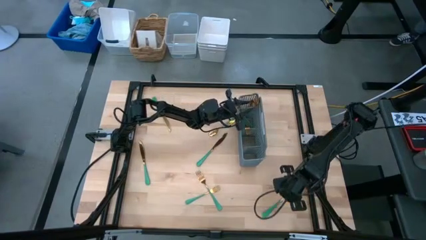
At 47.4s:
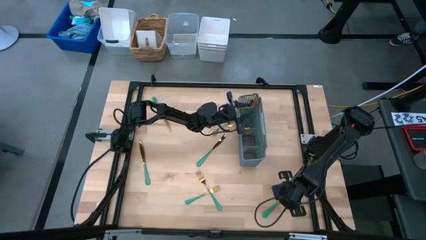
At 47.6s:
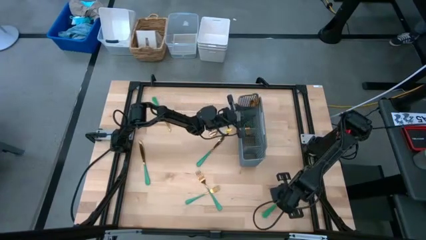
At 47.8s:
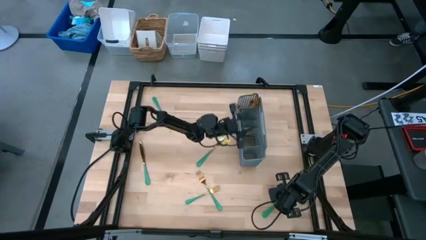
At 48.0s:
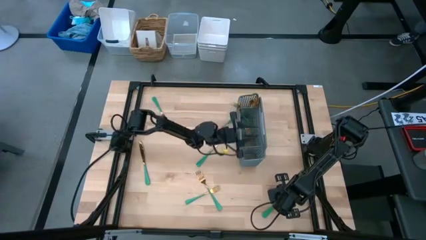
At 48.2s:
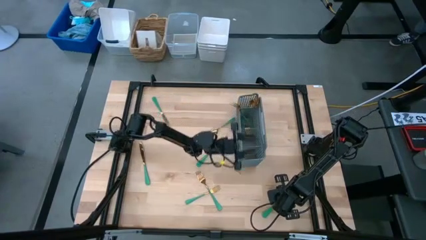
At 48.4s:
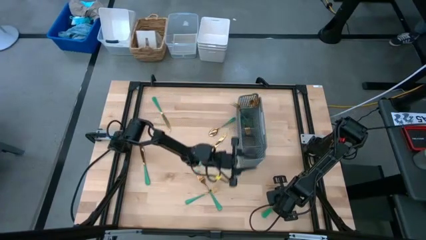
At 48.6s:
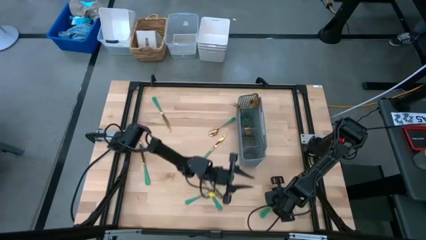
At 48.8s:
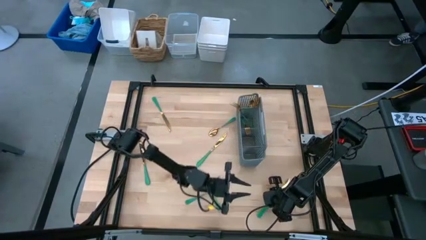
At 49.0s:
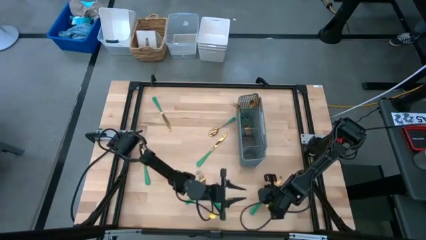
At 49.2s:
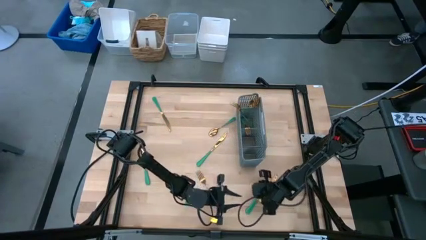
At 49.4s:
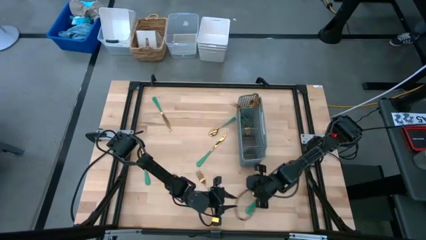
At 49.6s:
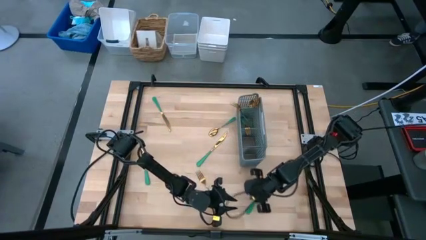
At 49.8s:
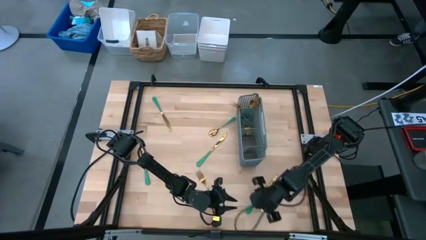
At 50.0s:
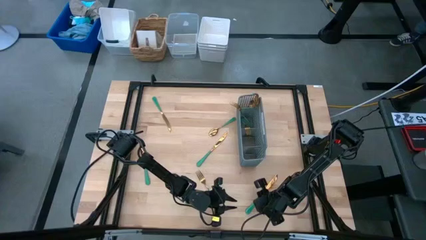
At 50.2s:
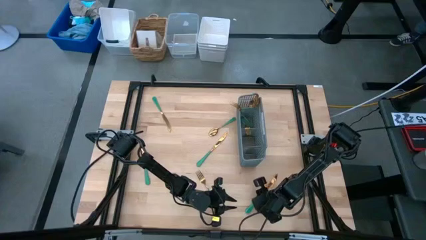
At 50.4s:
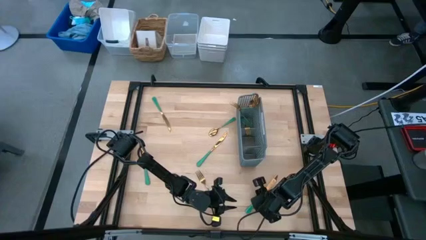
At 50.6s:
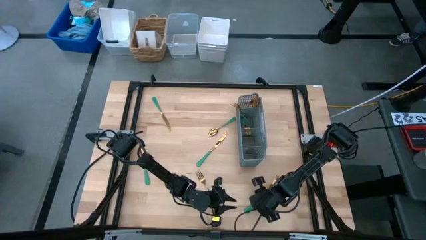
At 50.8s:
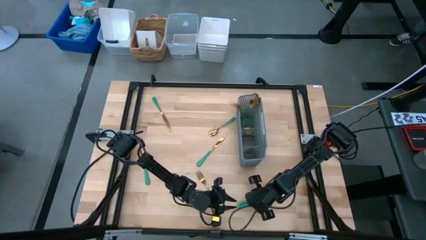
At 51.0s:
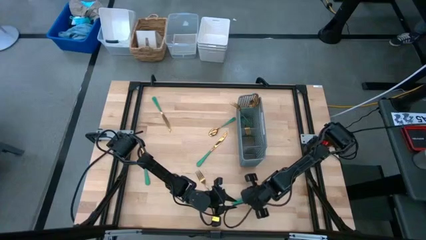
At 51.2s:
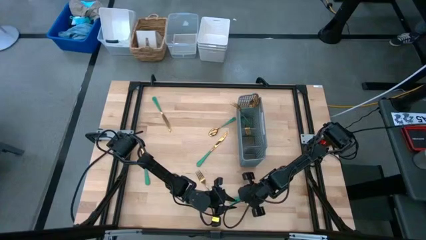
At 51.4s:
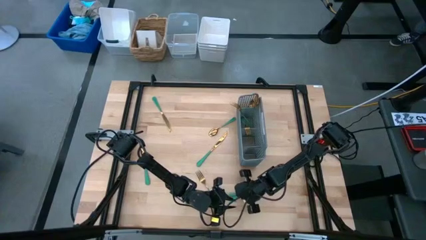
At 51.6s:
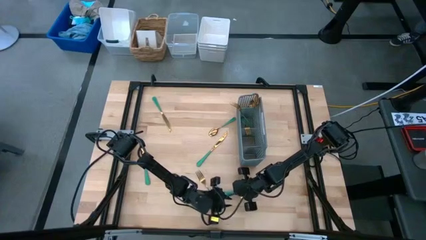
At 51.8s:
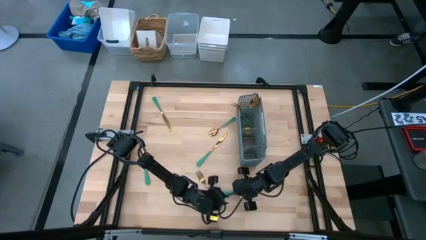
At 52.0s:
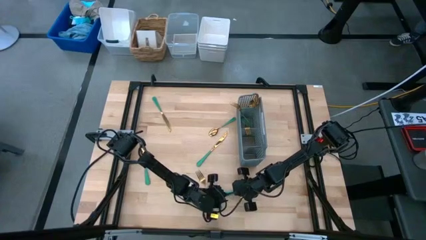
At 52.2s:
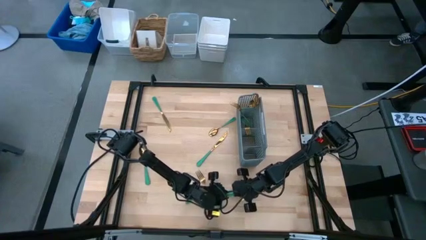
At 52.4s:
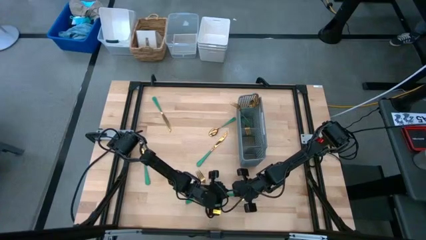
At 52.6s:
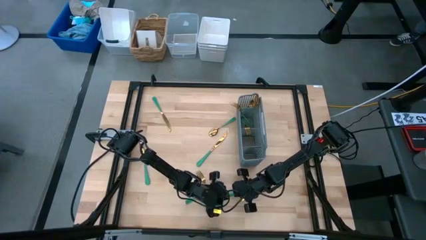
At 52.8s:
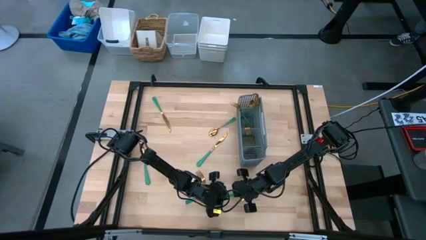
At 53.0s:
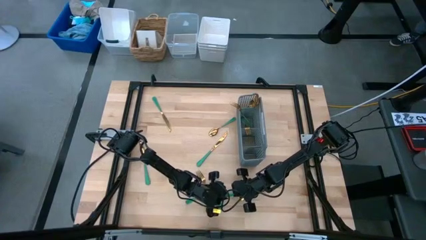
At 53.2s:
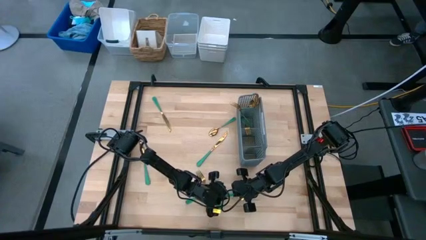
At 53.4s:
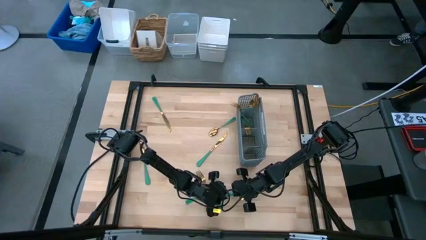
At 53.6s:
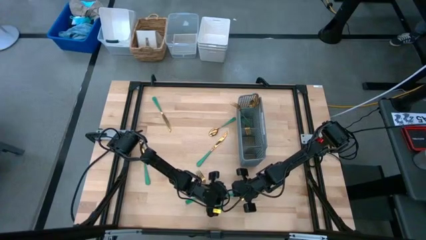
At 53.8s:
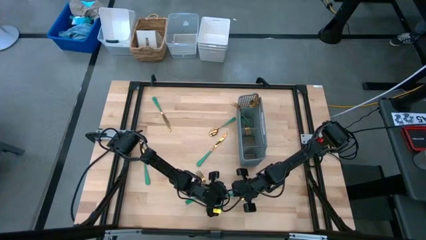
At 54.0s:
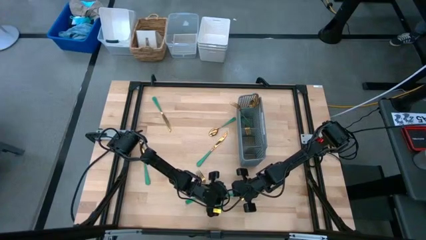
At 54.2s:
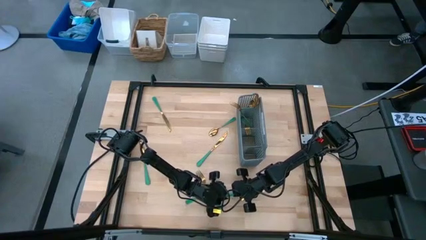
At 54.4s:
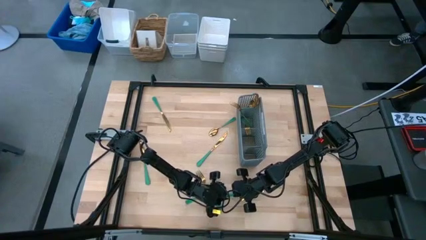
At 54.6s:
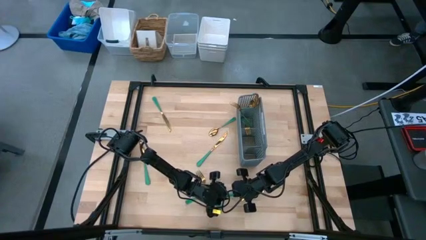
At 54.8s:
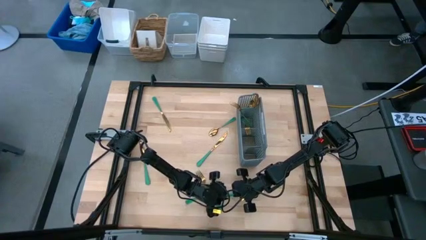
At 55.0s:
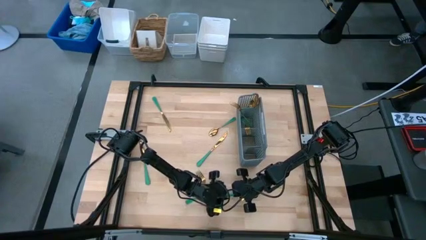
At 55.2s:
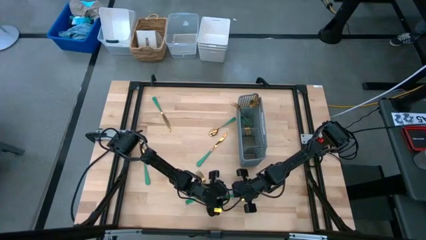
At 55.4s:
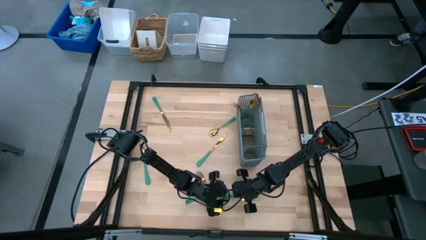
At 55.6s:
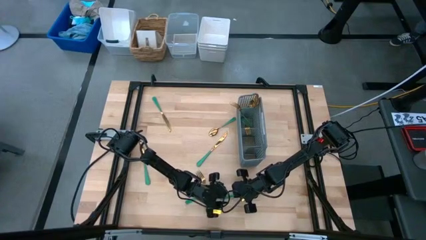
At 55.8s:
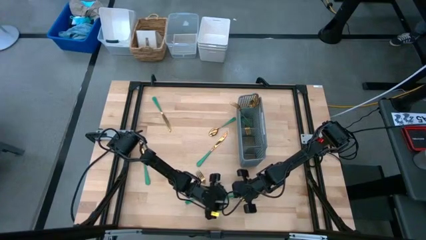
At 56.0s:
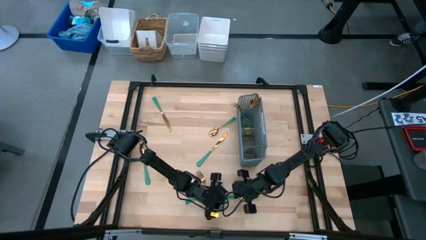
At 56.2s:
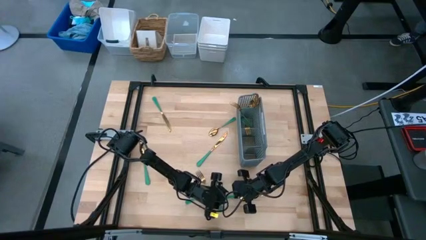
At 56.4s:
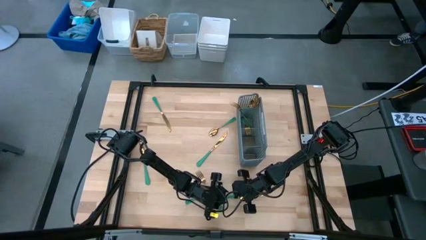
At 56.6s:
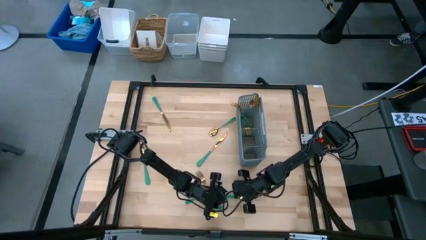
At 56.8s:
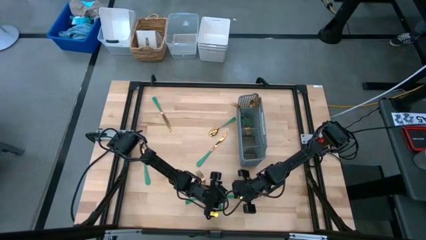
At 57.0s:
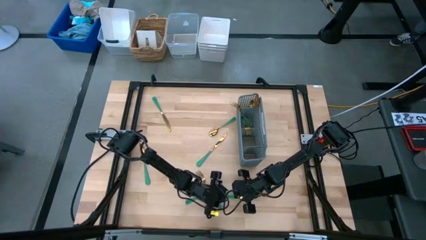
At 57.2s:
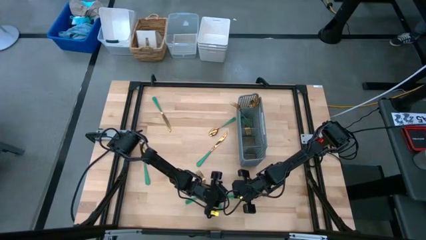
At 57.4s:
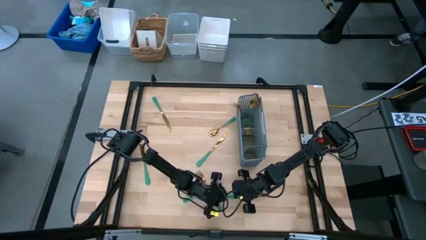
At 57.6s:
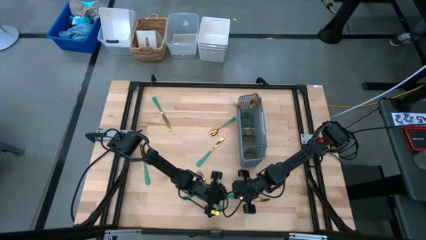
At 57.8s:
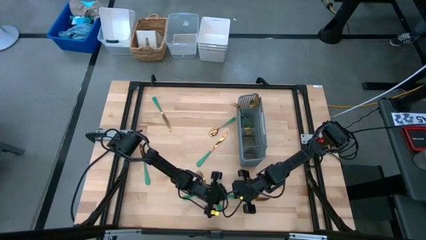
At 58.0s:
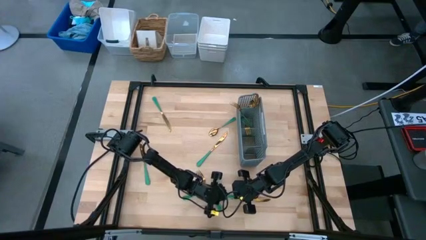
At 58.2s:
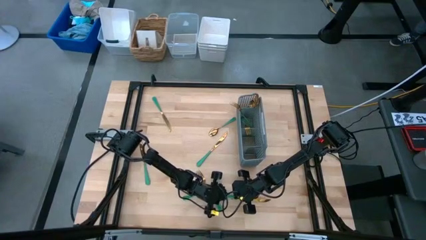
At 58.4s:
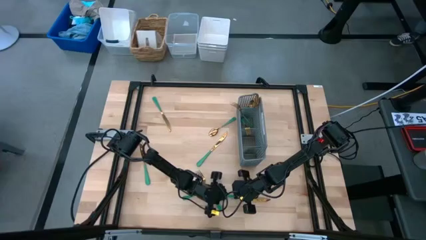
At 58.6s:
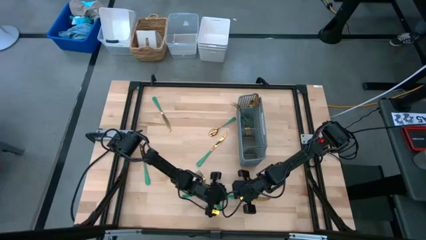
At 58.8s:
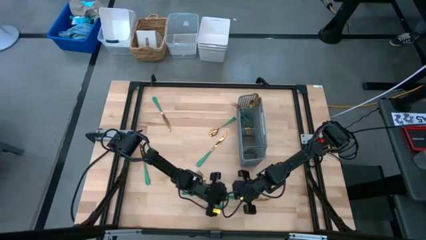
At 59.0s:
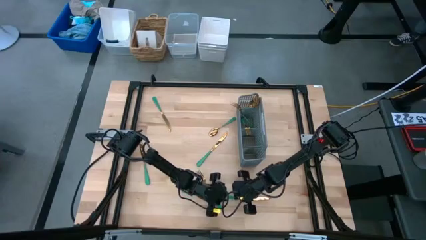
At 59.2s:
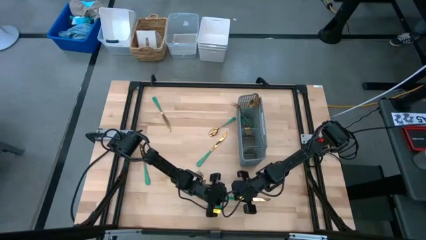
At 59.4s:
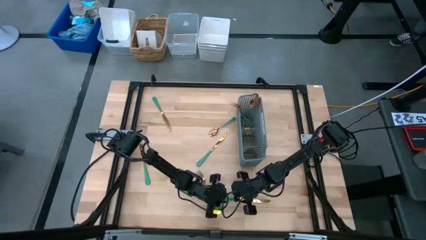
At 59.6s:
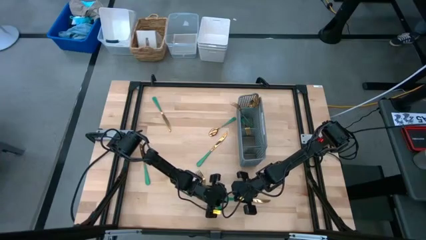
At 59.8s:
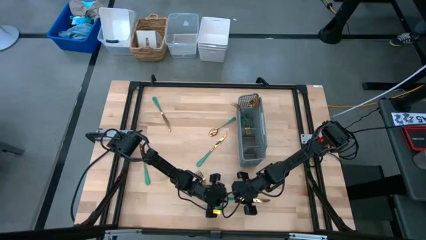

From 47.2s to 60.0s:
Task: Sort silverware
Put the bottom right knife into the bottom section of the basket

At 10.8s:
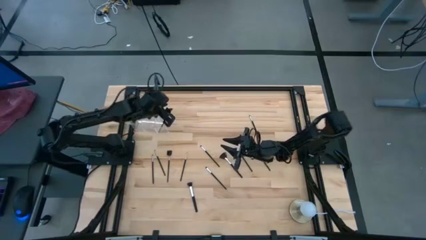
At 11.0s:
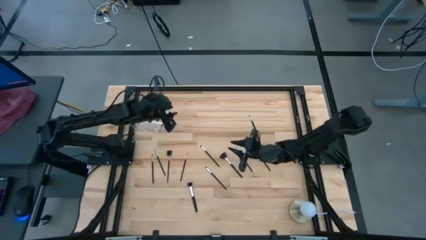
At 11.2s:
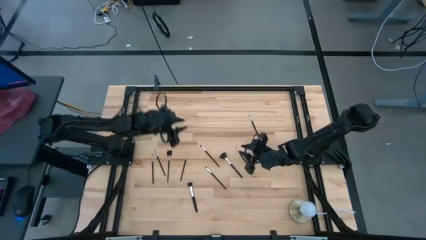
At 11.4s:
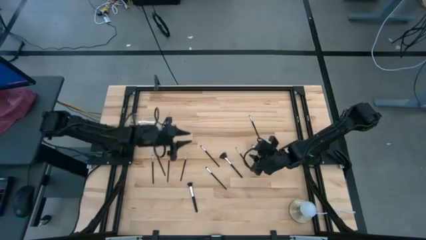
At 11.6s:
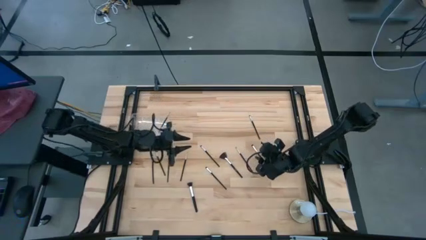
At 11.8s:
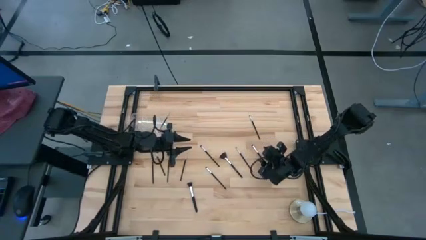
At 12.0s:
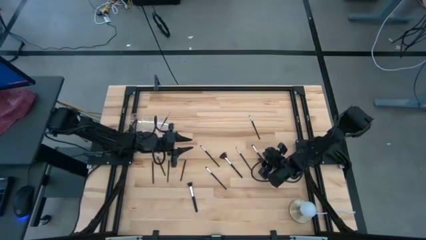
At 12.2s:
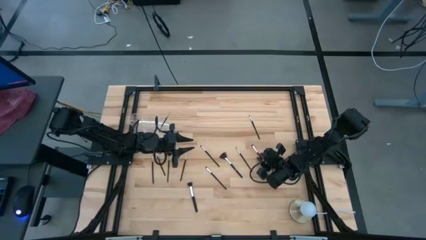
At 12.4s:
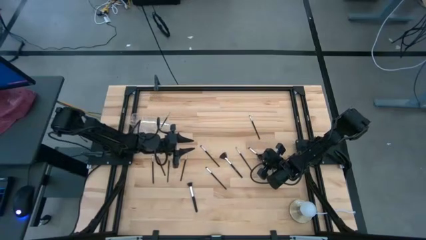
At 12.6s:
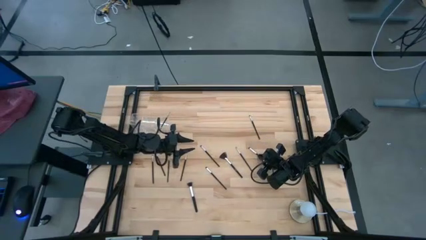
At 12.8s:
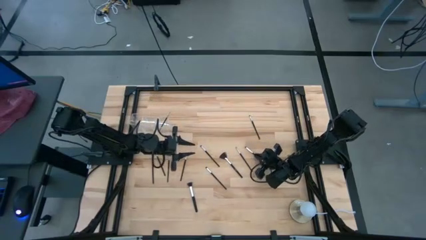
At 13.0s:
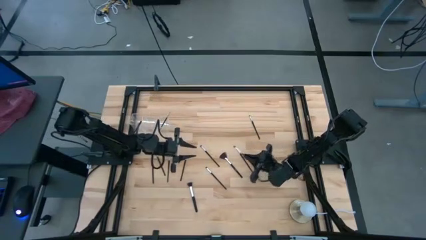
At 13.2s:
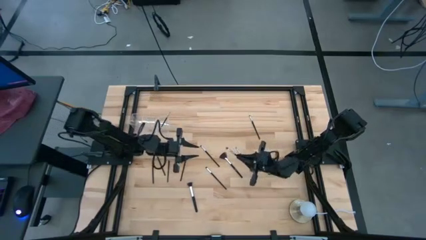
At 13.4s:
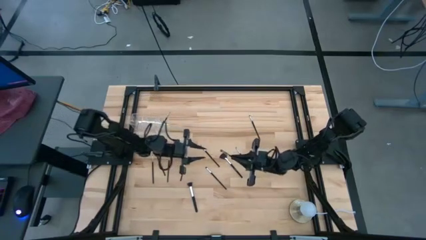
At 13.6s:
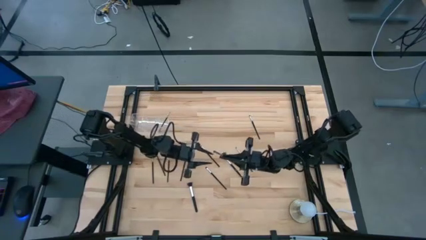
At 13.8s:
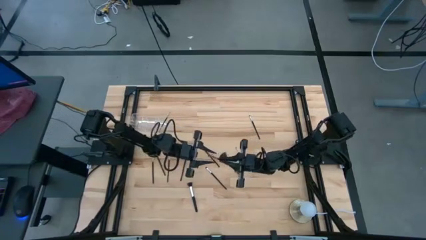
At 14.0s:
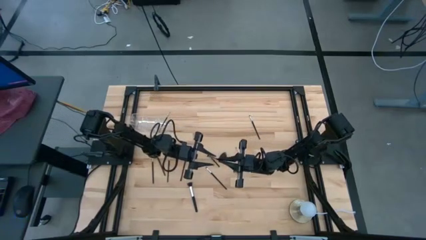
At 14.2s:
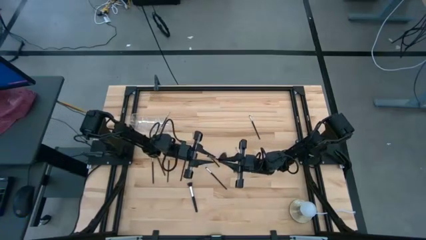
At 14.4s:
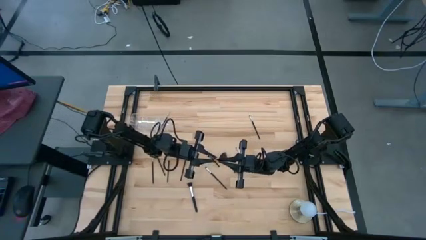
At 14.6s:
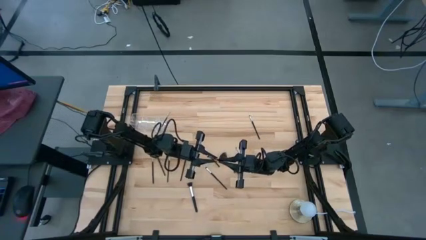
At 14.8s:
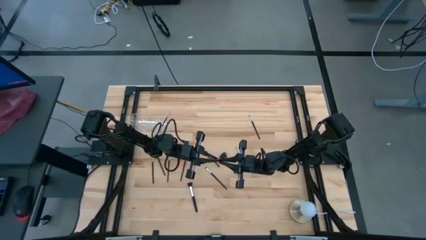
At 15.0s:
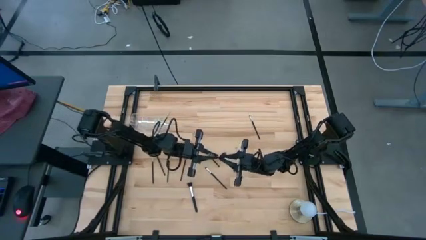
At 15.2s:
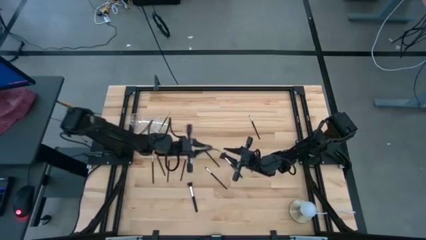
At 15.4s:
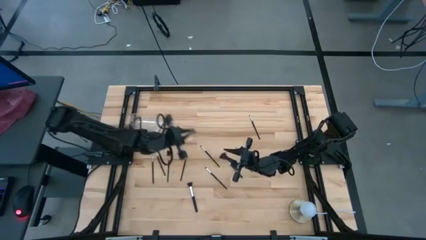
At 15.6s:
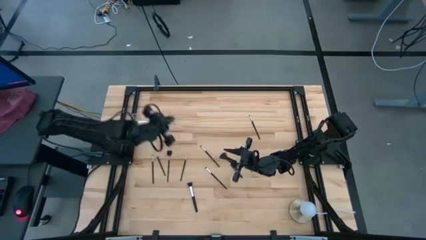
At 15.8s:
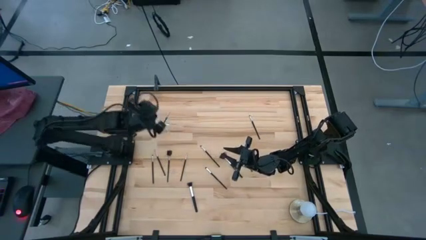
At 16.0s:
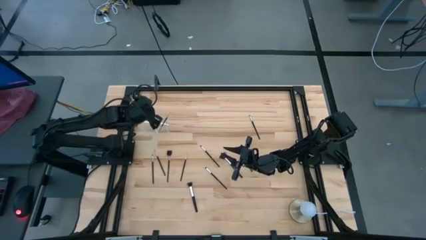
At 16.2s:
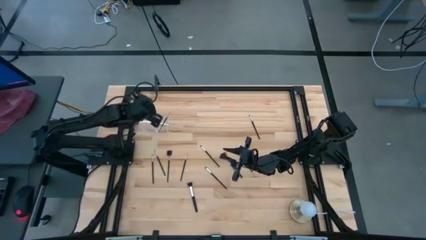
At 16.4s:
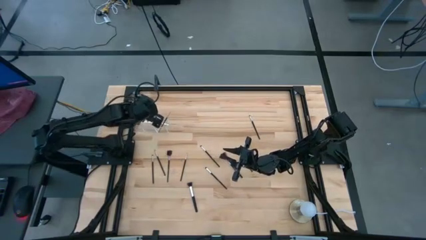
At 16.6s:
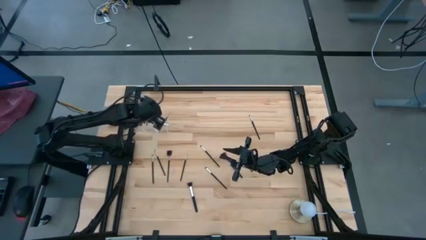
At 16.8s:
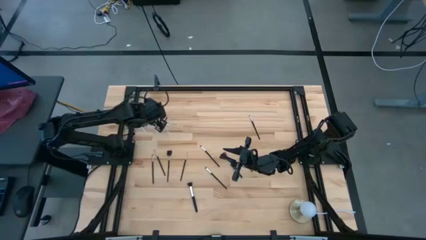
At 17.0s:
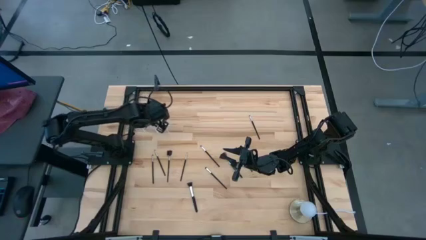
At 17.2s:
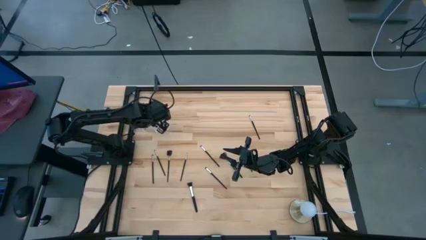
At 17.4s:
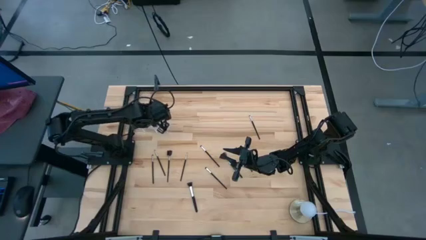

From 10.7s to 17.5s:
Task: Put items in baskets/containers
Put the eyeshadow brush into the transparent organizer
